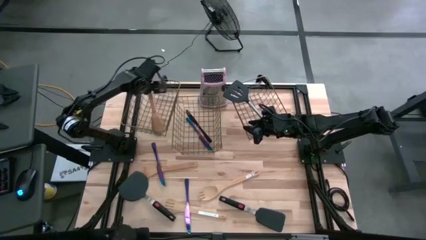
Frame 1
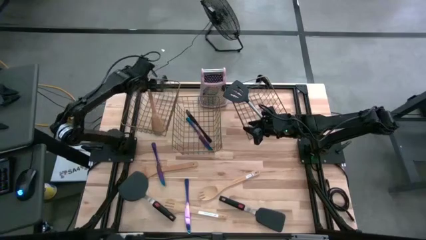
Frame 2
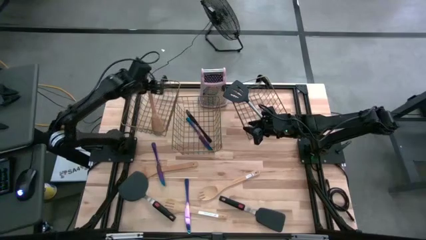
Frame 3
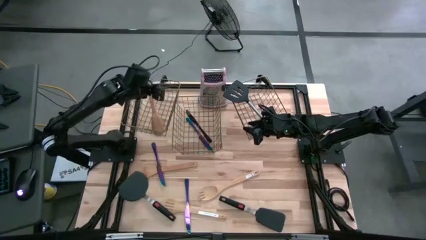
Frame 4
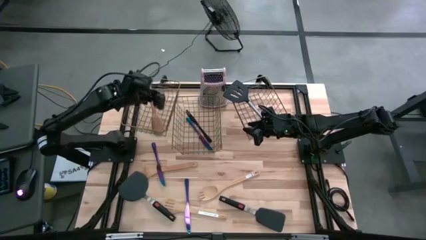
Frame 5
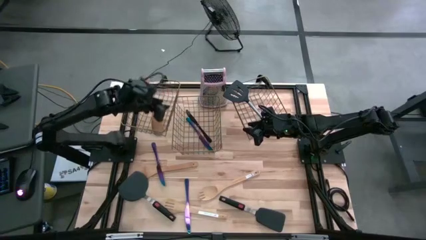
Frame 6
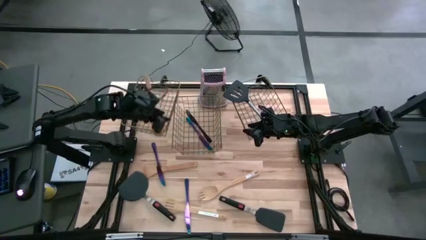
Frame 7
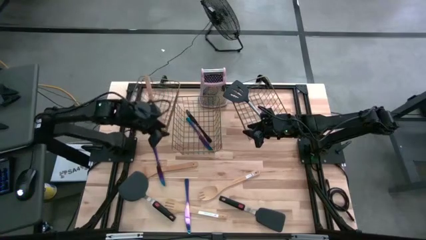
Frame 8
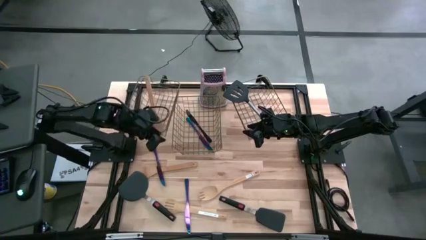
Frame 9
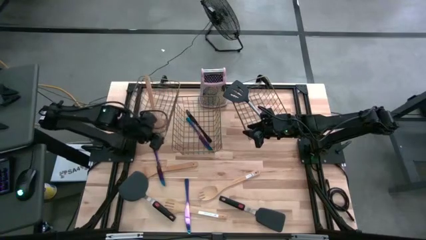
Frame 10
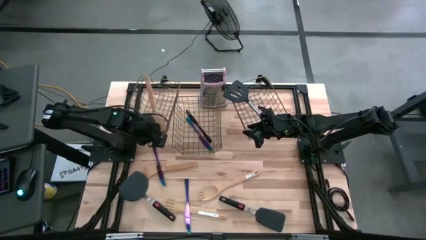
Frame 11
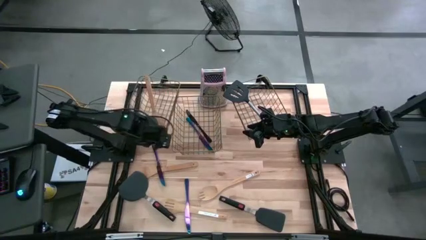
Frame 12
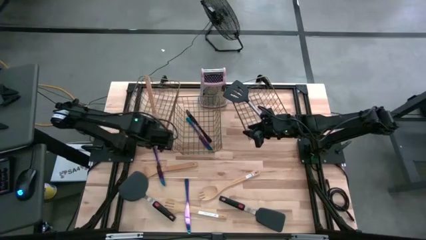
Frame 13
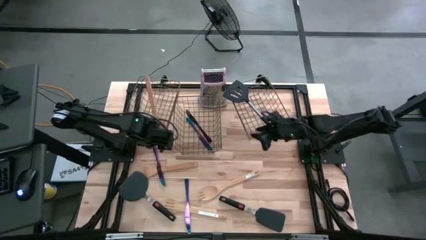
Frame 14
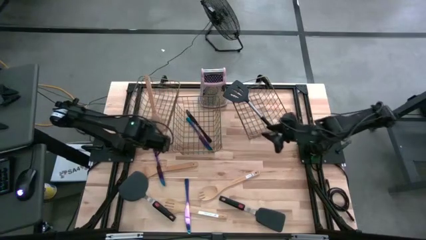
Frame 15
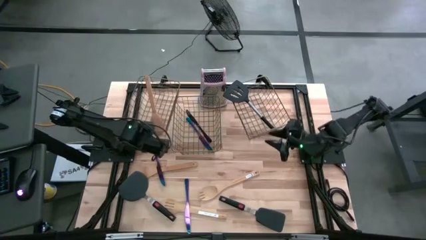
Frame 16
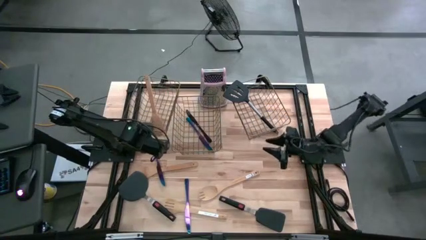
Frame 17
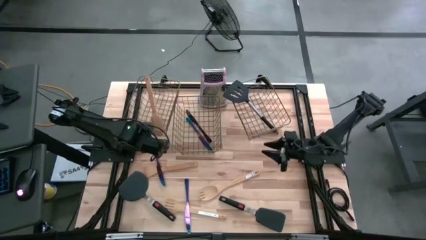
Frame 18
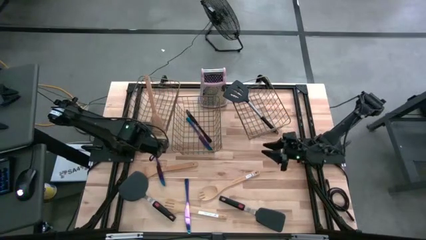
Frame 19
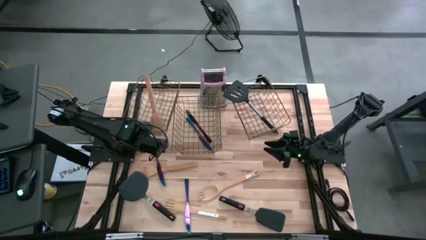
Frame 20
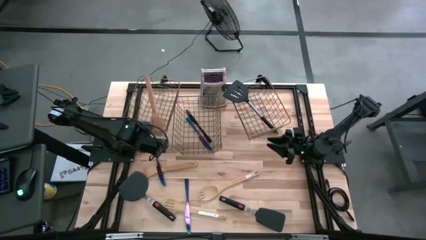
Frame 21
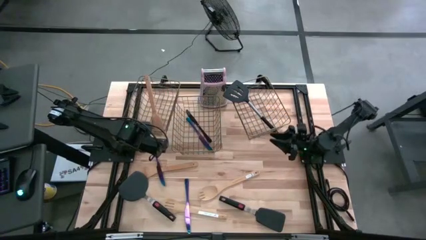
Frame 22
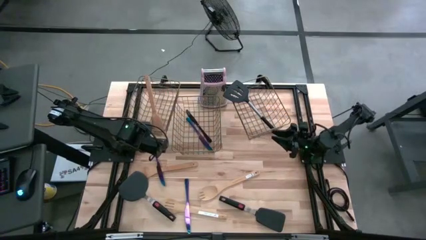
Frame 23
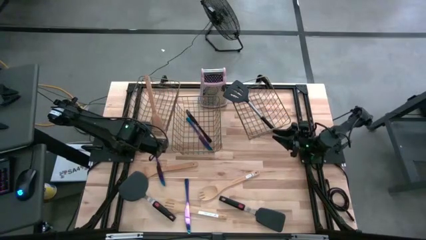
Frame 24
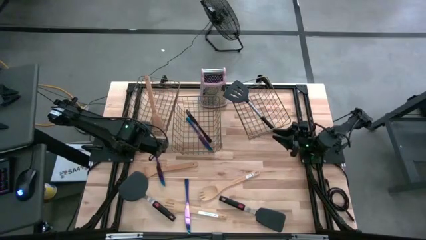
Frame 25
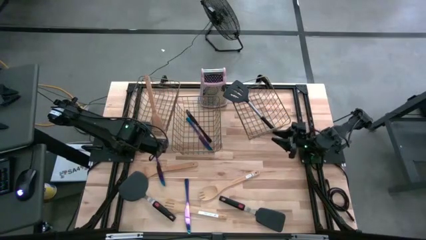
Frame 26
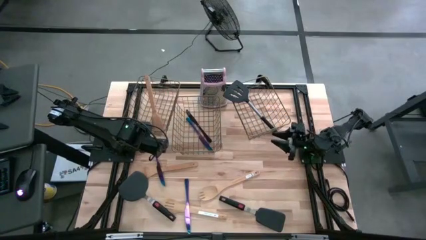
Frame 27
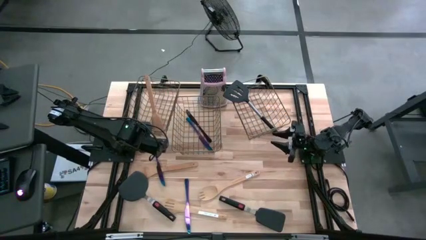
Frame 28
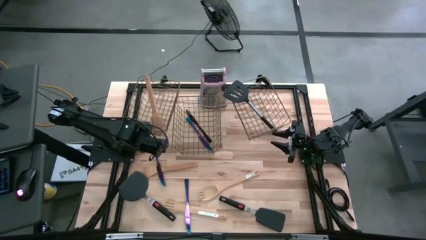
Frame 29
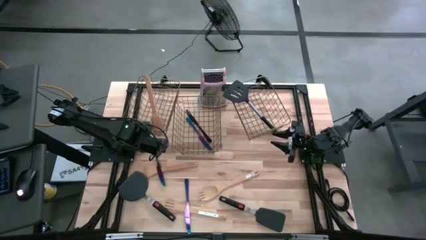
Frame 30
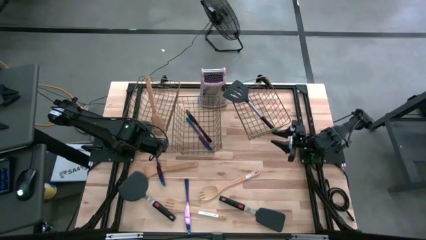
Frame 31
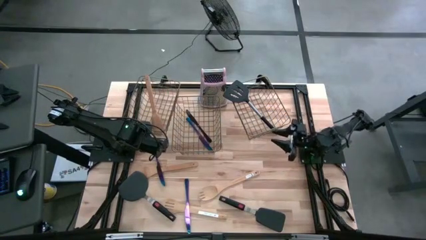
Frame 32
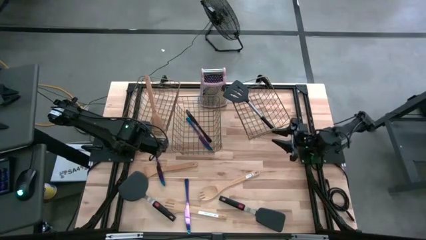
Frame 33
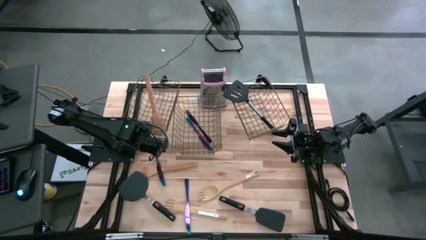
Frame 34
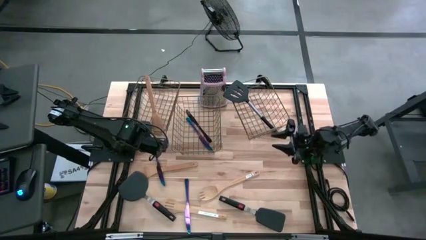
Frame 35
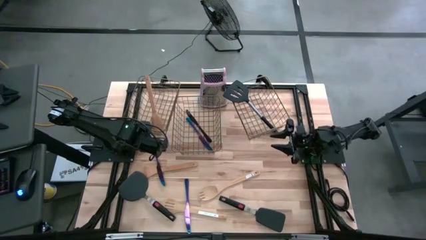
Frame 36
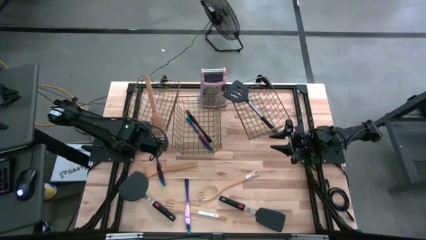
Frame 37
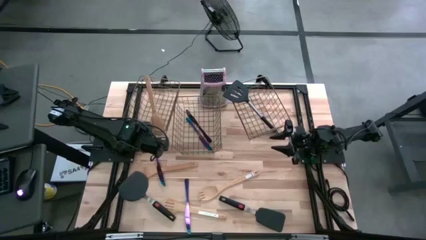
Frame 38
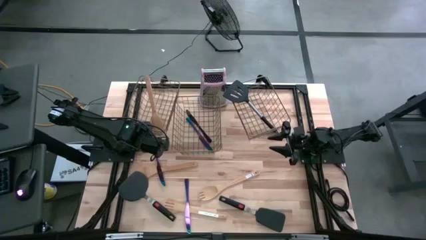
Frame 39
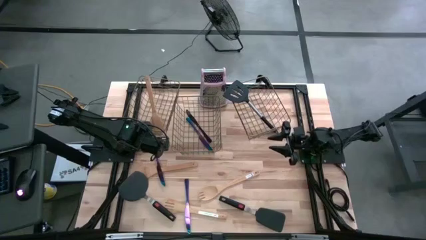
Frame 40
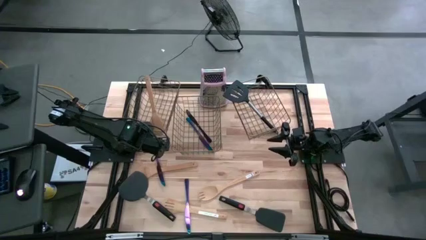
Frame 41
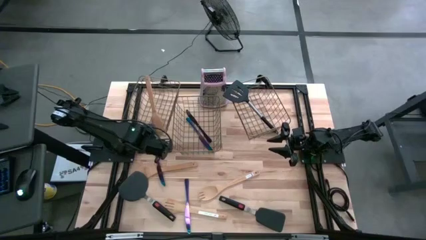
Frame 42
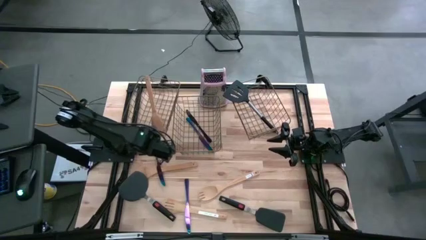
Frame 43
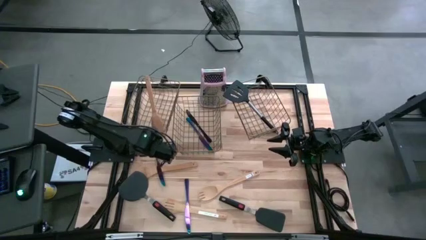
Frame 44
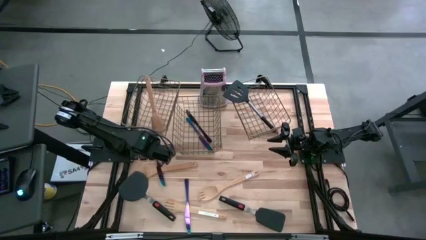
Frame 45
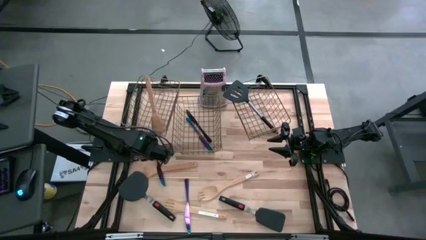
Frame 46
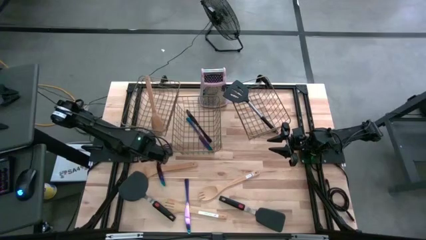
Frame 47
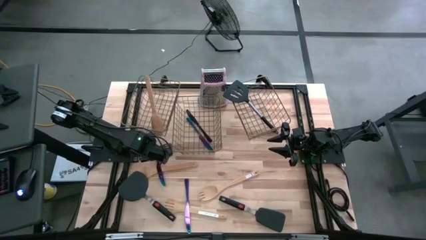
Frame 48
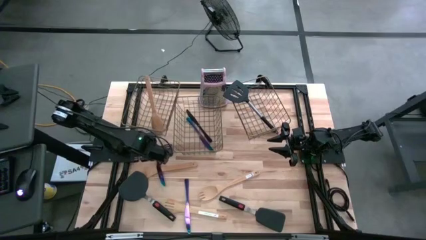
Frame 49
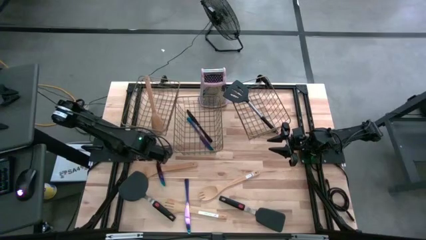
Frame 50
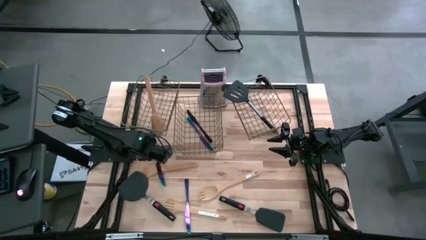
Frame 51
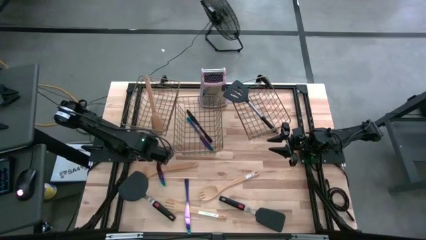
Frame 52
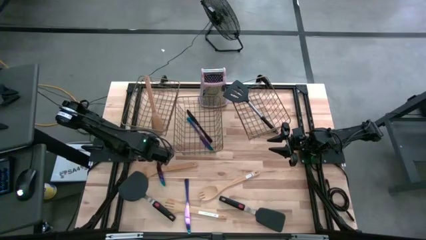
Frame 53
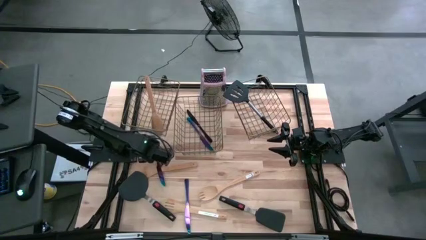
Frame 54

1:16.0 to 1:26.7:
Task: Pick & Place Kitchen Items
Put the top blue table knife into the middle wire basket

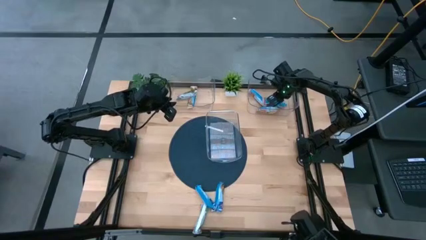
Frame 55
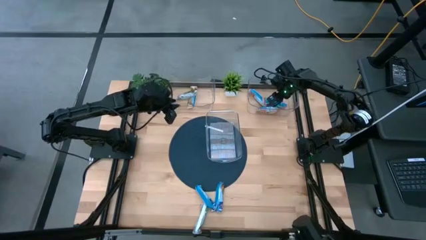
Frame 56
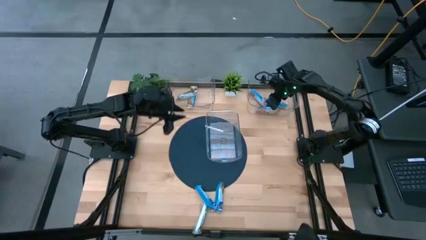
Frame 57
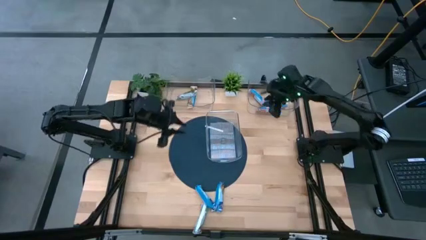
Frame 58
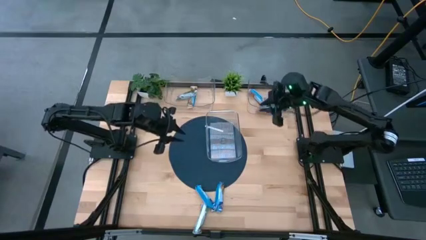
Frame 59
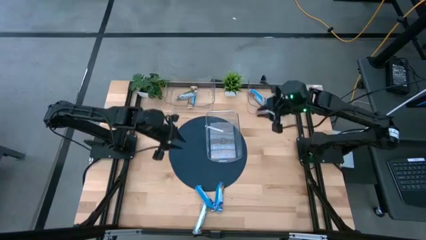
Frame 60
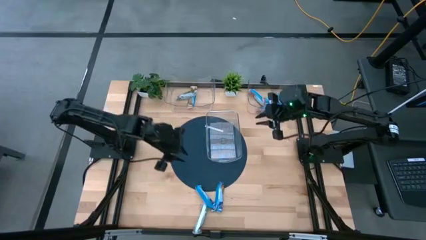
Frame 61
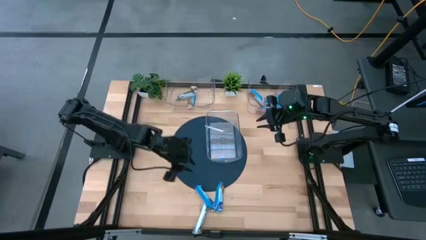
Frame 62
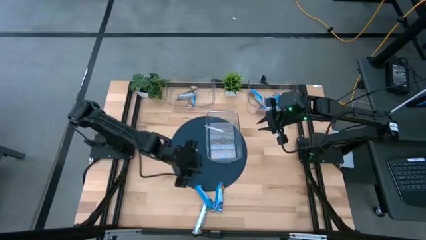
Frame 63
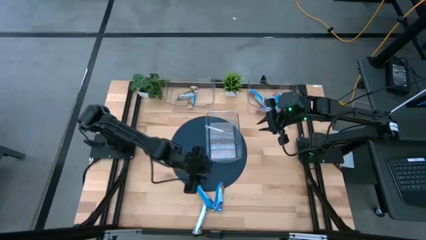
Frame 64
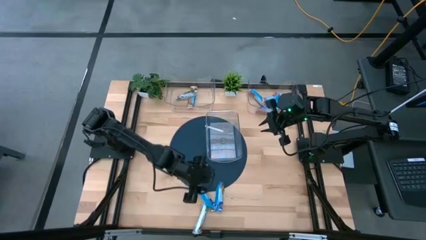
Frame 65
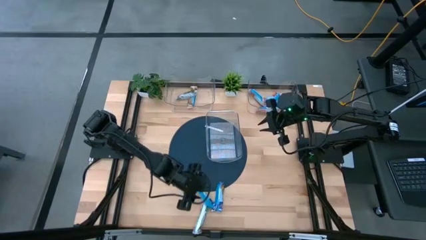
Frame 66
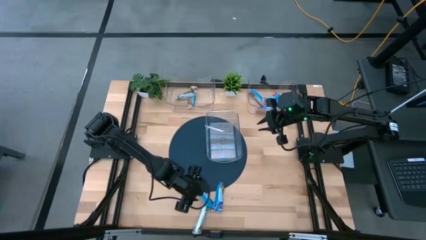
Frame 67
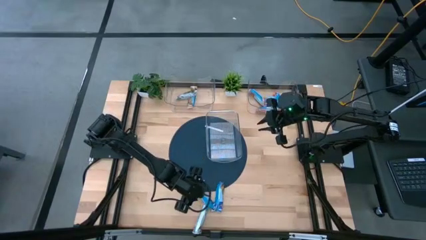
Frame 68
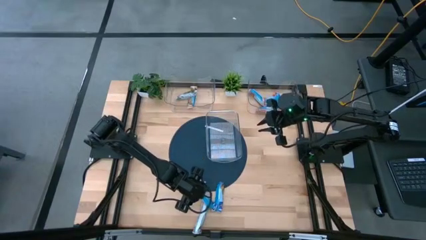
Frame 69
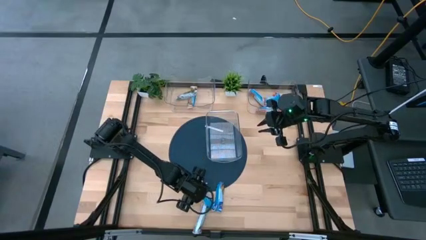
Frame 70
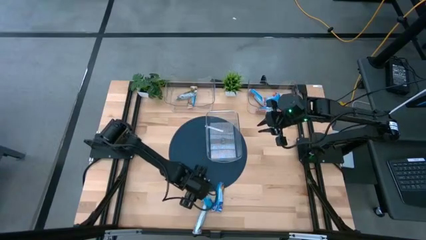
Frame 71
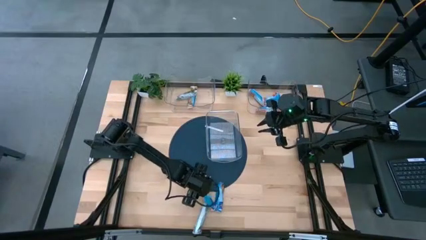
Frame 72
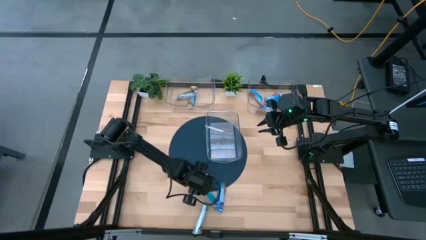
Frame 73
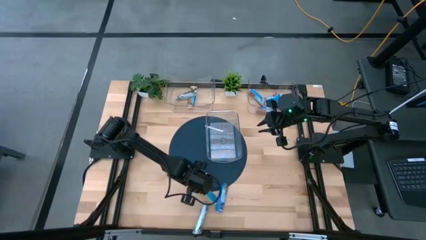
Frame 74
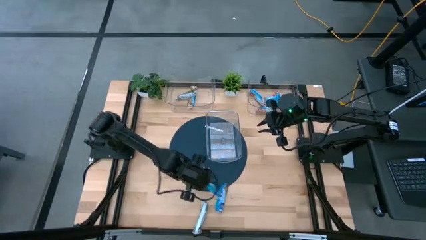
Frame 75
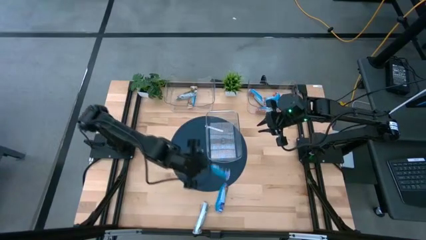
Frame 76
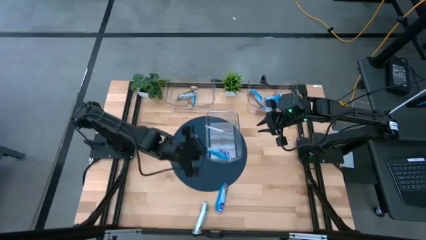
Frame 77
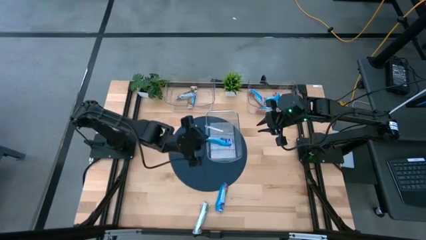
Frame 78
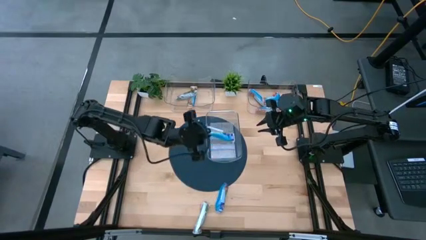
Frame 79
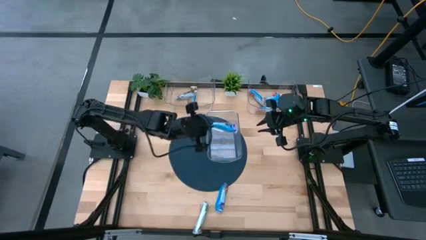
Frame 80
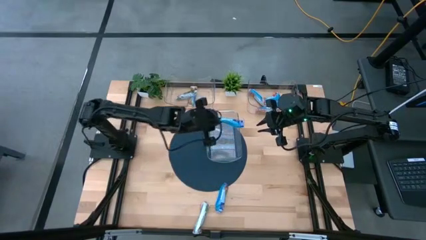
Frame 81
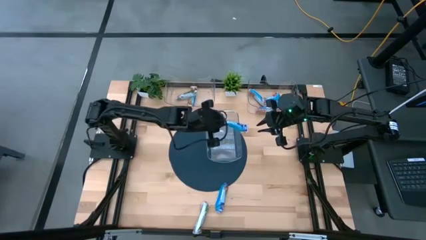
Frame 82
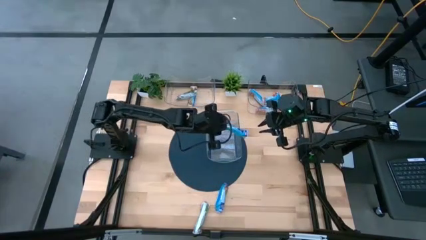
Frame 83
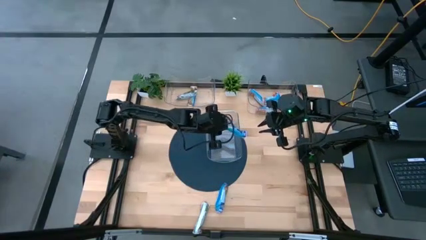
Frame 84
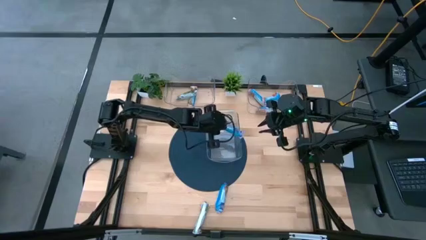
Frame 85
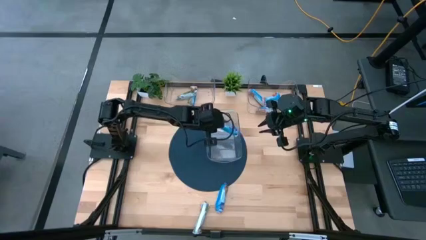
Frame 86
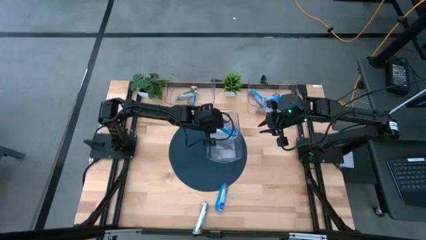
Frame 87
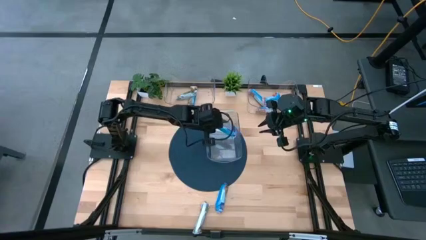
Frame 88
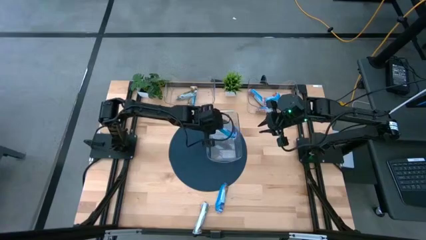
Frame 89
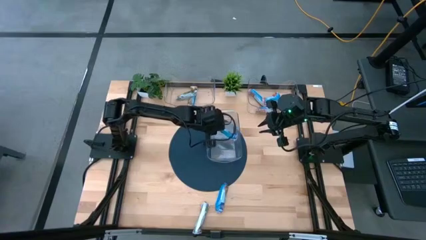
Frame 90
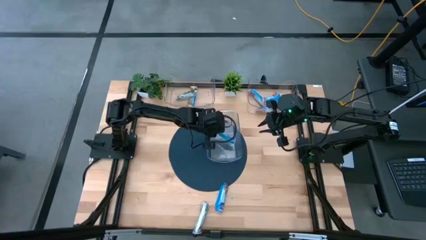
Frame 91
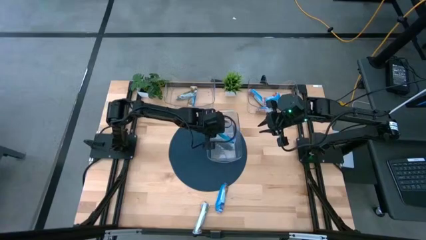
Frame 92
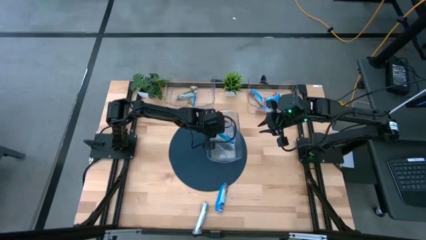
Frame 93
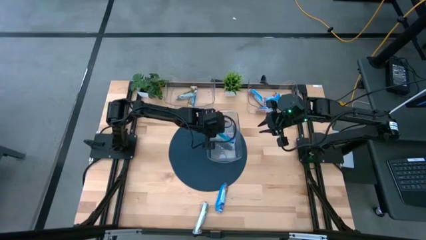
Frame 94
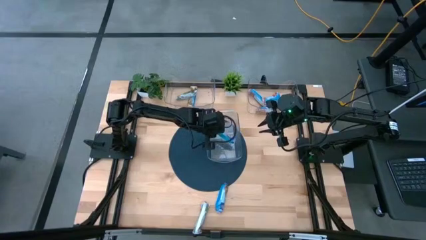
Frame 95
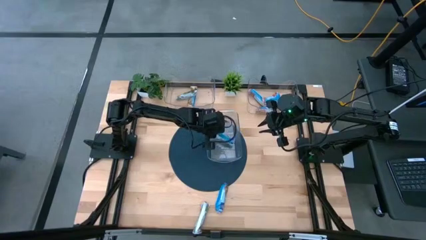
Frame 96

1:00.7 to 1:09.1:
Task: Pick and place Granola Bars by type
Put the blue granola bar into the bottom transparent bin
